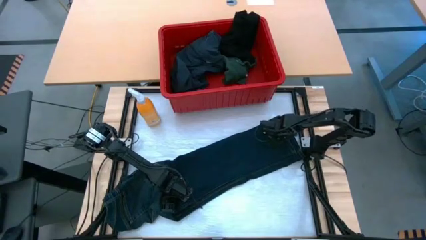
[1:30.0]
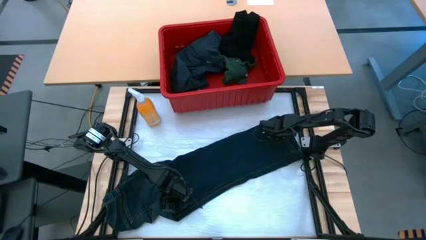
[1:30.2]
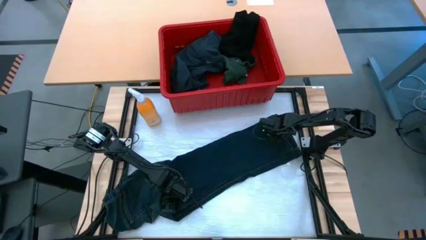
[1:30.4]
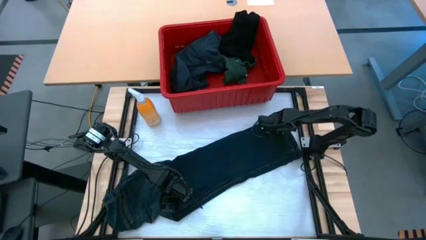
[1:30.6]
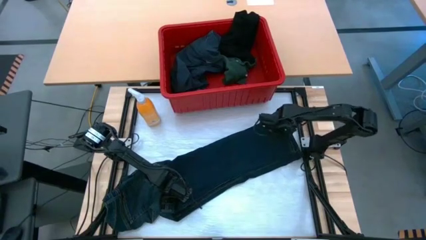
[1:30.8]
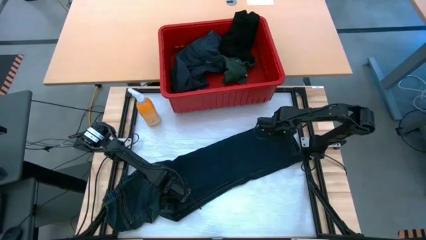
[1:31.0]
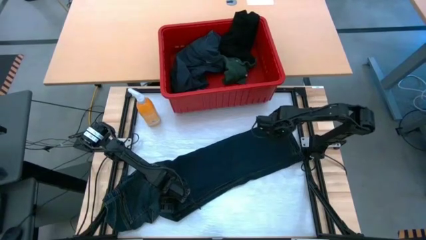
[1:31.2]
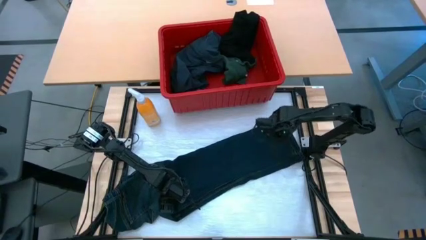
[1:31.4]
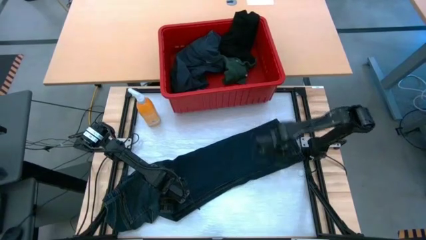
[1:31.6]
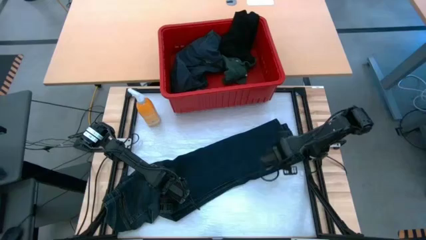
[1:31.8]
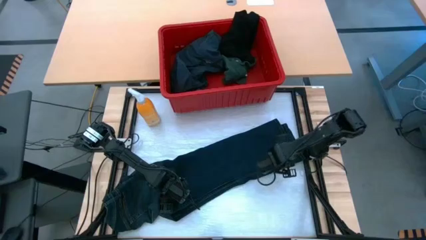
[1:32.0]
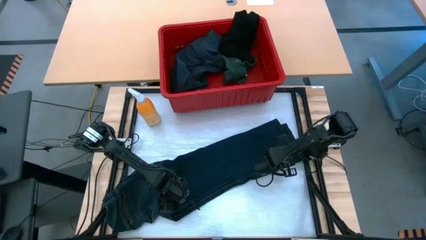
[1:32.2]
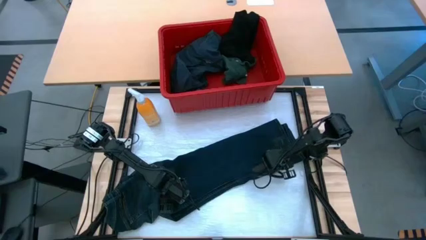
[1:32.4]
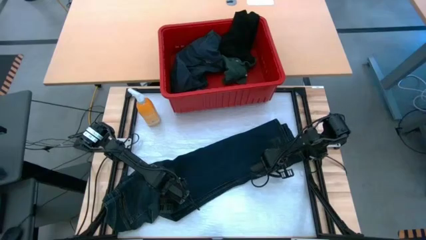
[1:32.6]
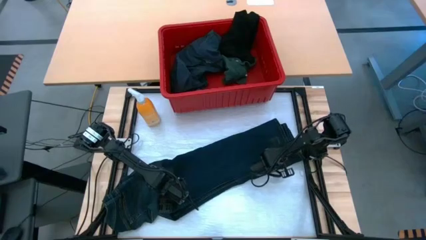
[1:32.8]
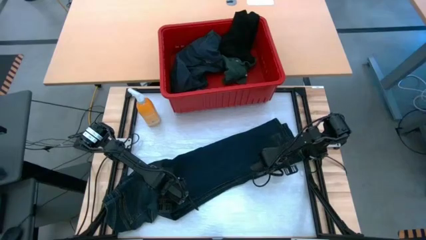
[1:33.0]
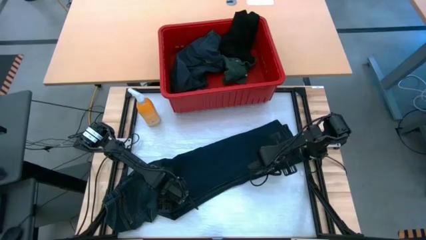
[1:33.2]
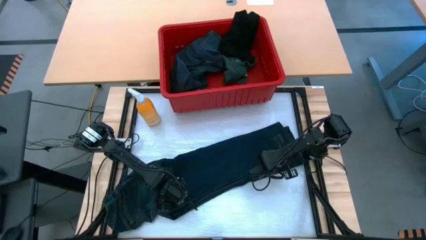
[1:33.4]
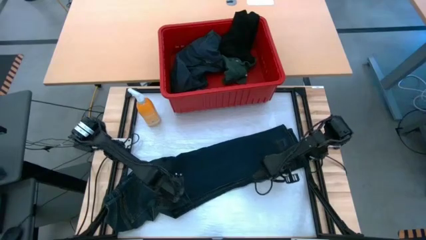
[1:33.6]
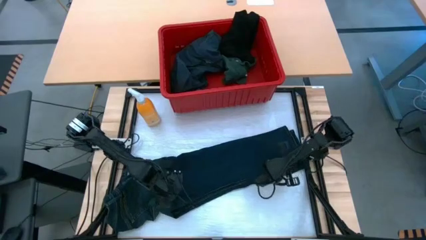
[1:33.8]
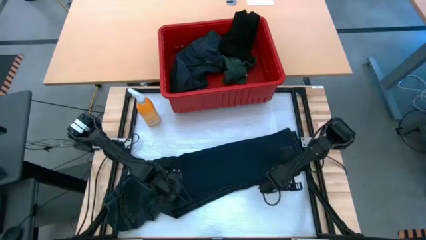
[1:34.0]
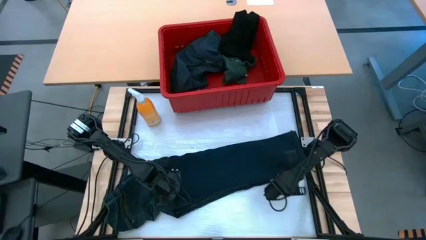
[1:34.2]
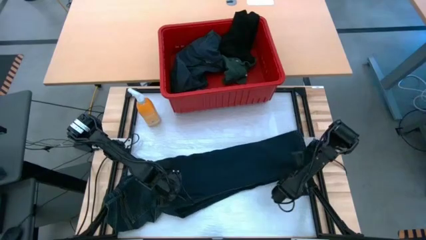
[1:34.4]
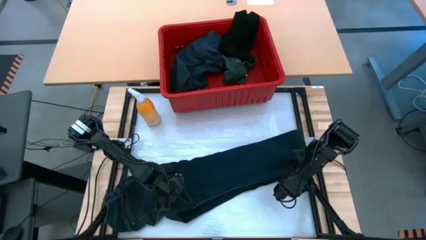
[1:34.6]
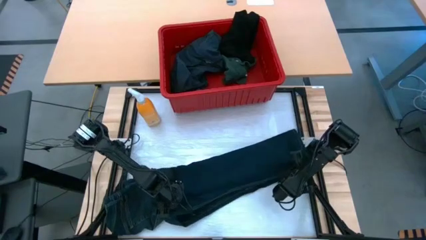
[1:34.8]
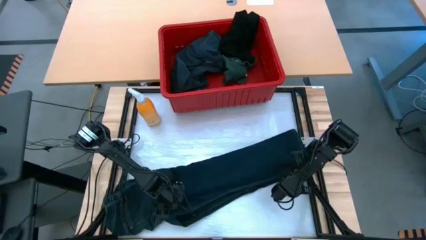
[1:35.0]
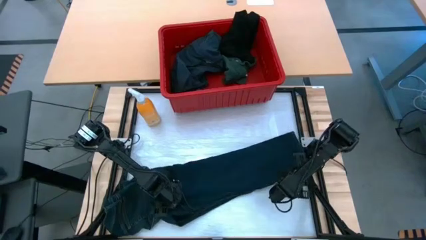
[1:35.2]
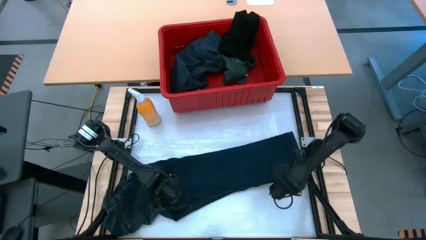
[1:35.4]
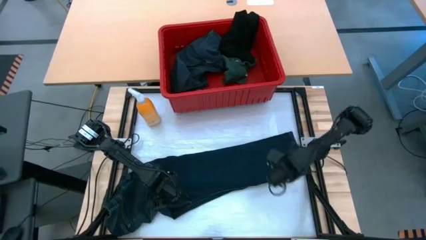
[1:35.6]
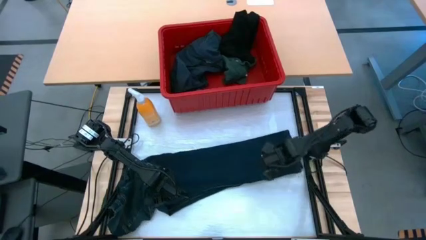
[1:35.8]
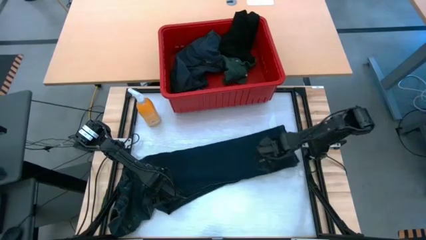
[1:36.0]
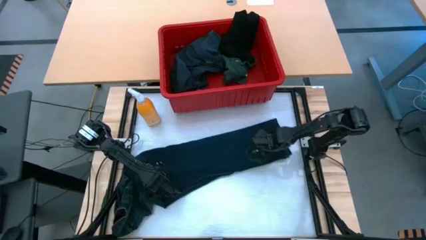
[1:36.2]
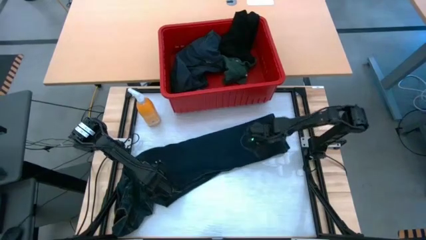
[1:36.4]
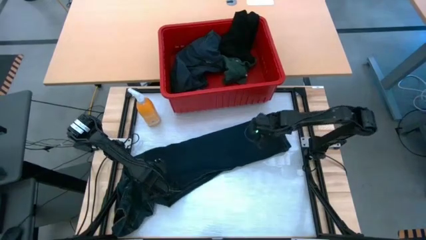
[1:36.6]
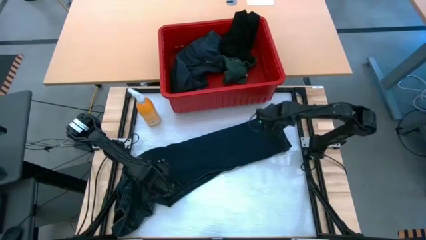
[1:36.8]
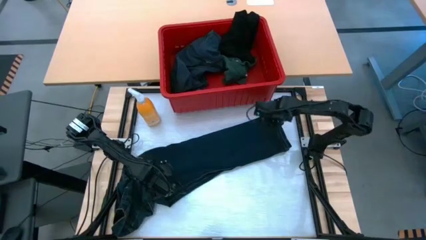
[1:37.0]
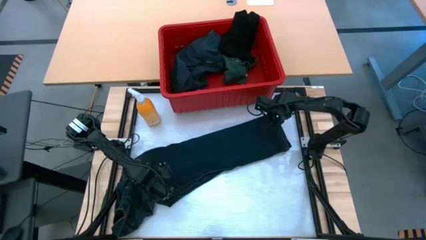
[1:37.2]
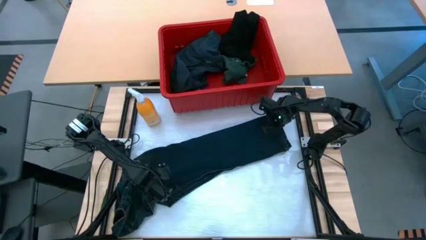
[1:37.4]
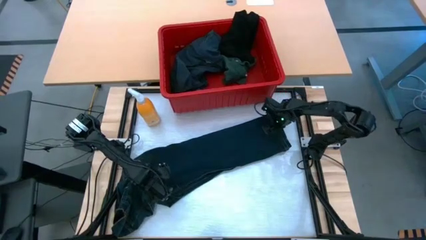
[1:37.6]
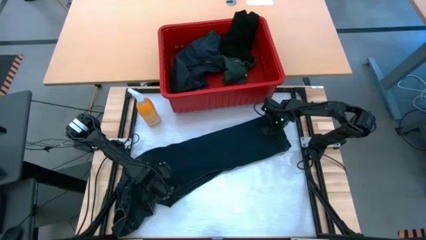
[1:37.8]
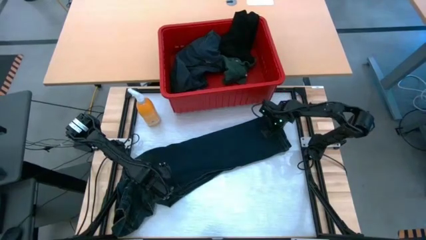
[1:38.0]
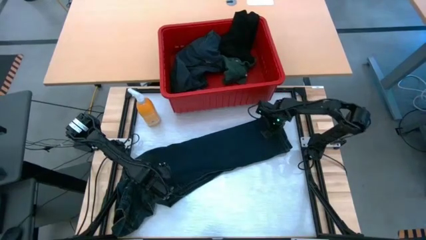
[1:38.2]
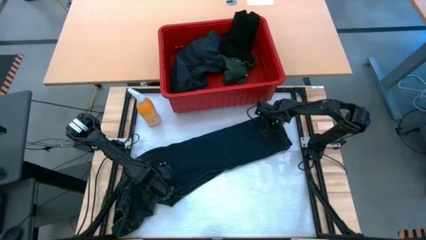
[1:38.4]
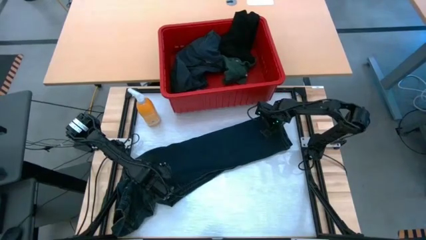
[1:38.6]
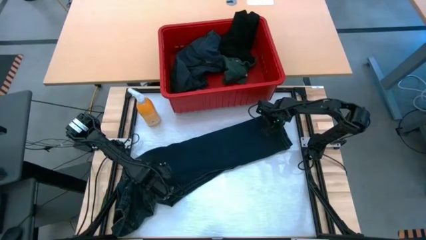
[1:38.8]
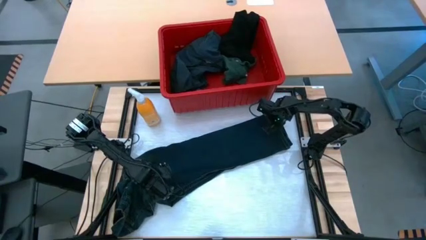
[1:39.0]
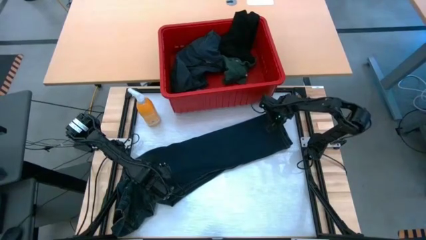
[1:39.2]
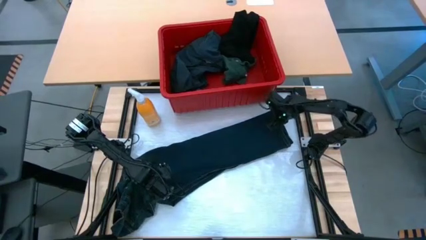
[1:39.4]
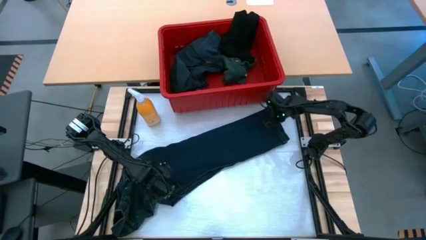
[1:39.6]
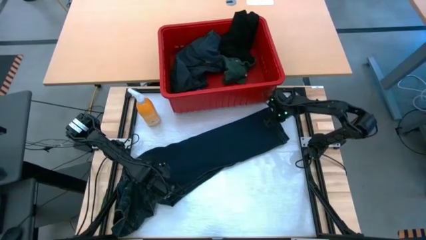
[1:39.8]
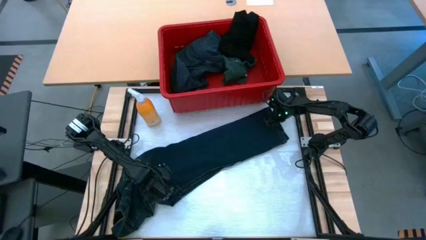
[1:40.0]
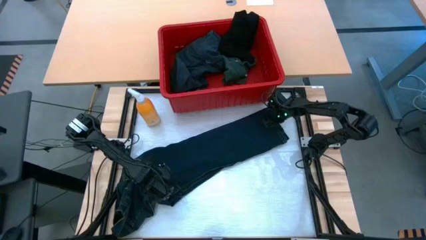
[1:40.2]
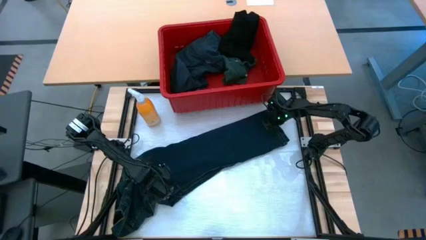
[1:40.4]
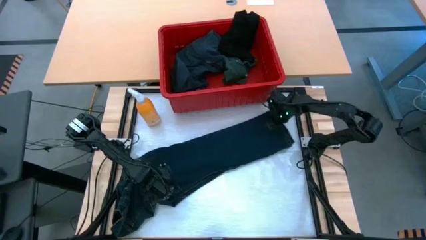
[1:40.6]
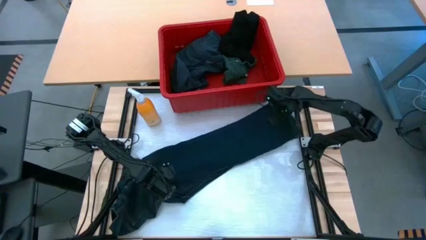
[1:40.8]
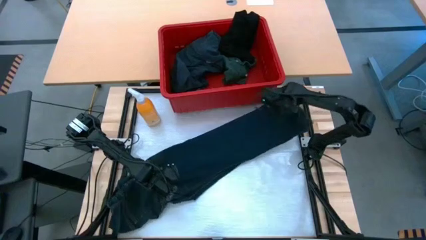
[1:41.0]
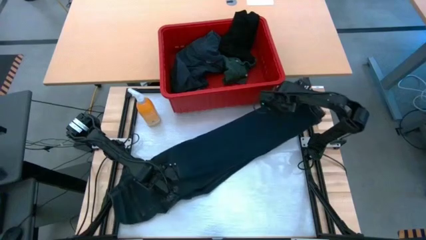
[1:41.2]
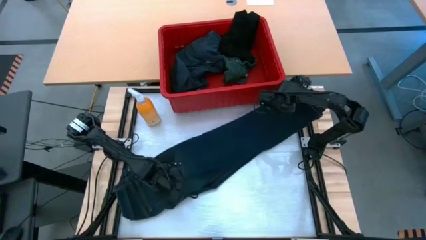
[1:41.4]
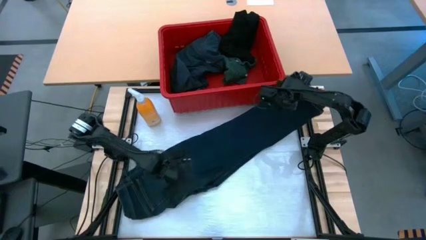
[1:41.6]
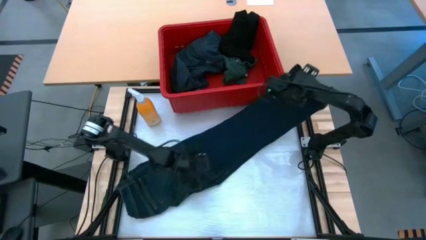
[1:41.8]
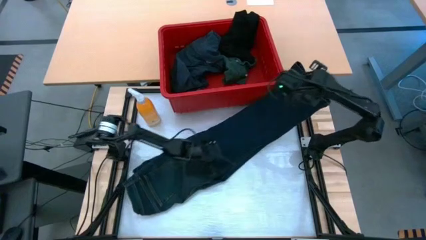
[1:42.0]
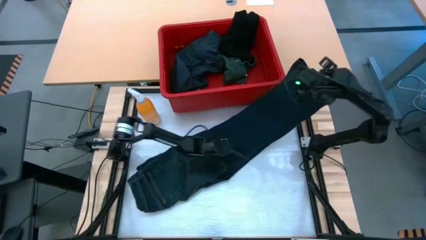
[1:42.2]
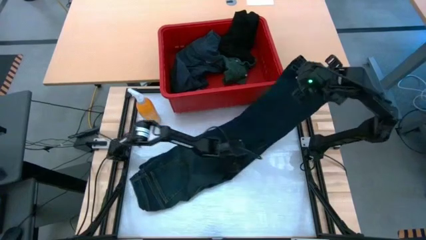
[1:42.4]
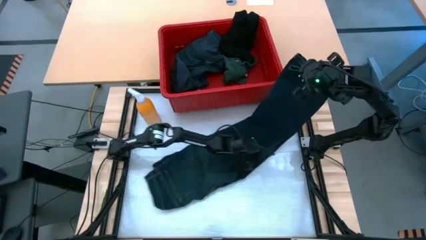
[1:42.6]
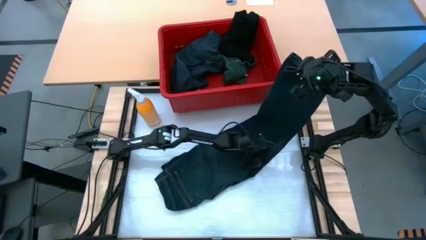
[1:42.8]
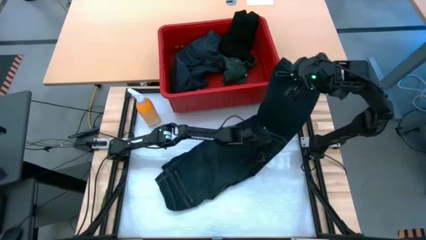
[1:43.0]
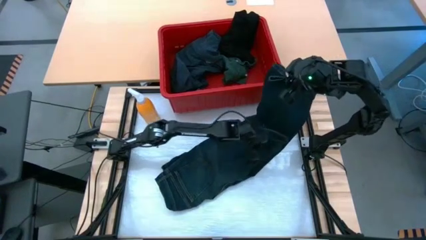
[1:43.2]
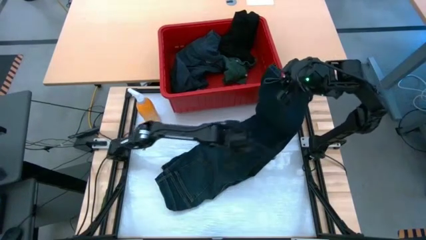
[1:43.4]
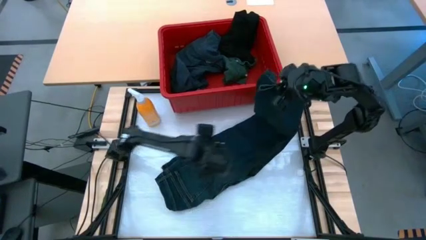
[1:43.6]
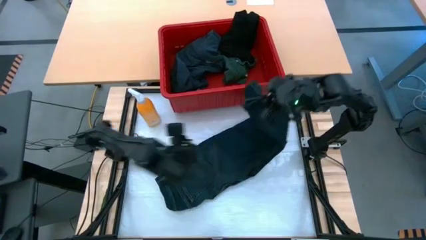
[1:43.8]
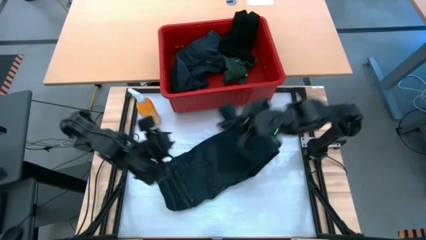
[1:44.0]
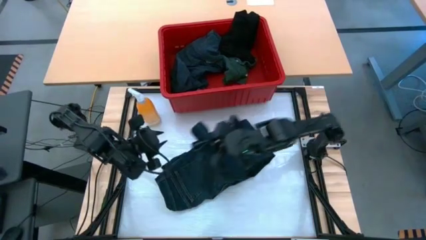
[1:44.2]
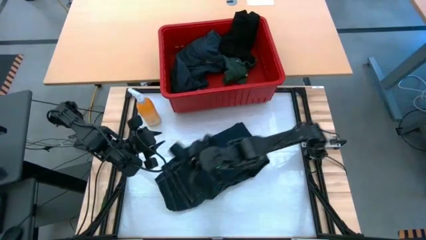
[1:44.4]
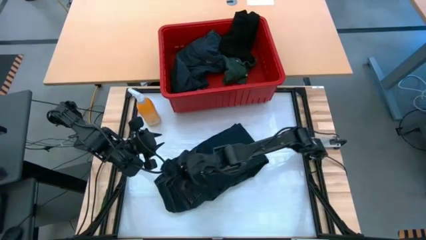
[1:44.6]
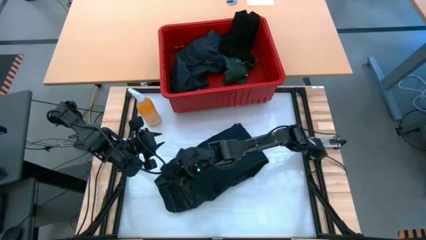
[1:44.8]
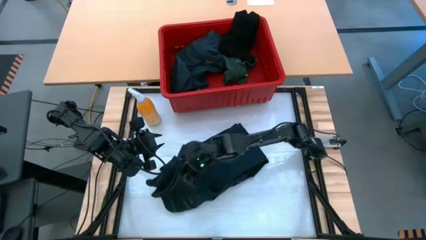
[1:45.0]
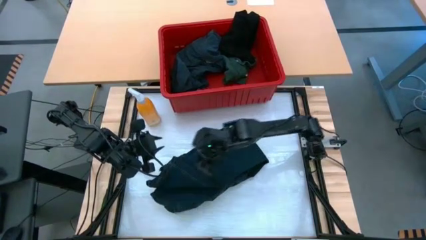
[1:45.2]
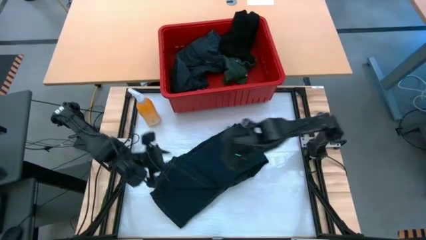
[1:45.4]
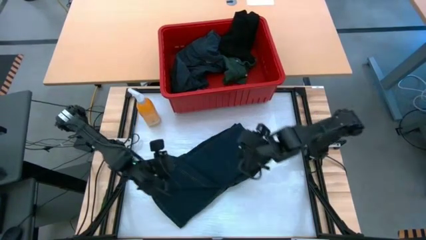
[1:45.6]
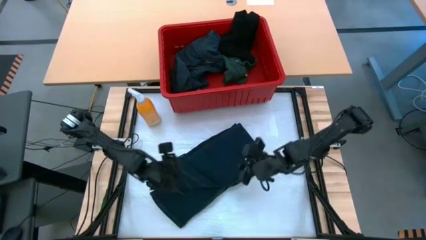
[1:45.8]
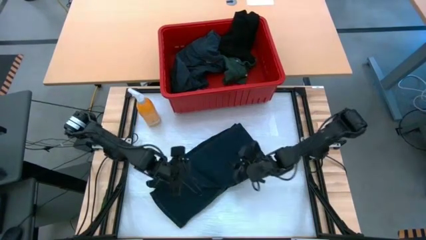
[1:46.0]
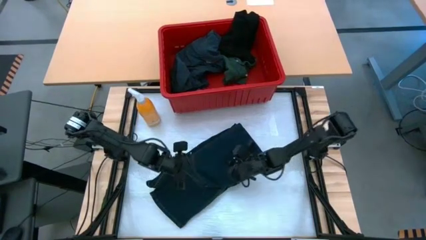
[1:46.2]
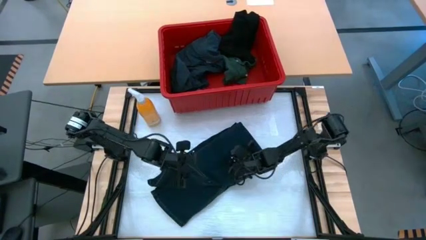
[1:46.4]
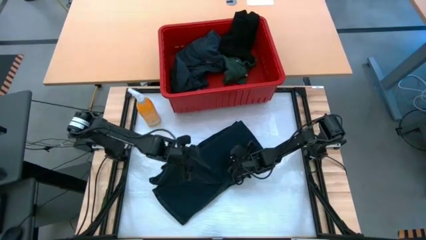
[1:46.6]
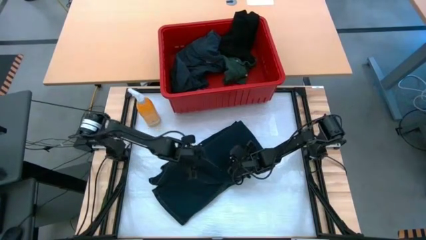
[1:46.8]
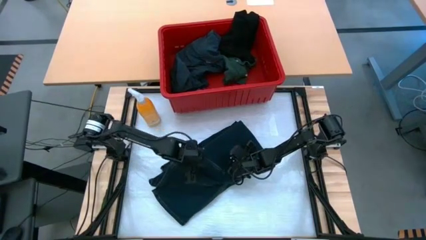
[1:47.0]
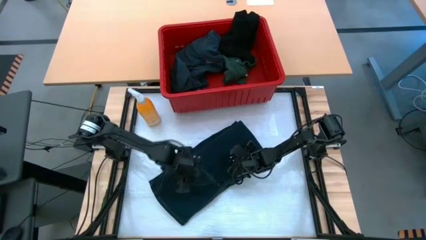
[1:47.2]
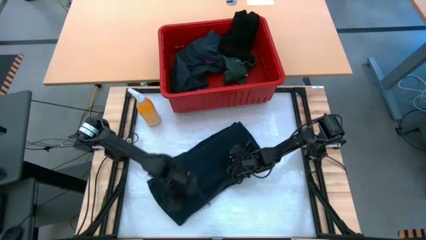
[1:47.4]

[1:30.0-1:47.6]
Task: Fold Laundry from Bin
Fold the dark blue jeans
